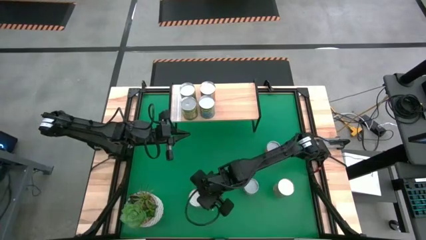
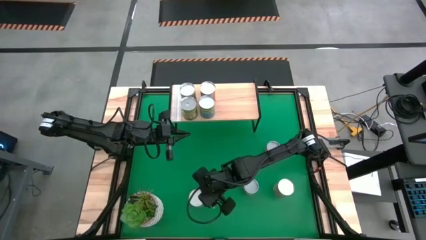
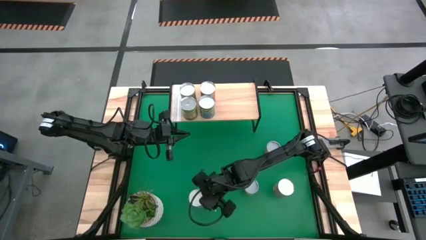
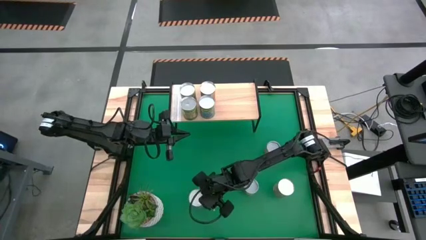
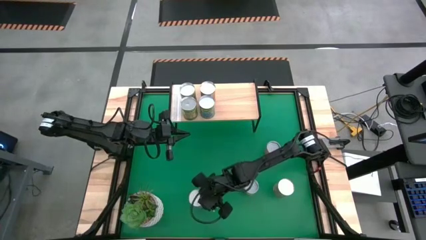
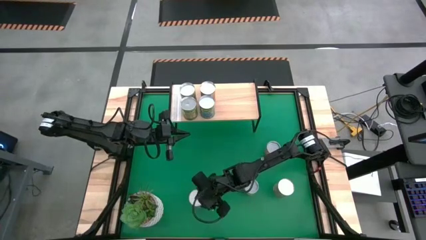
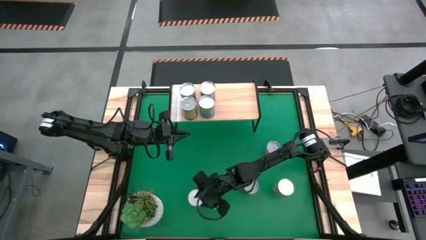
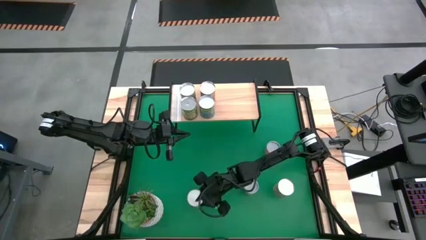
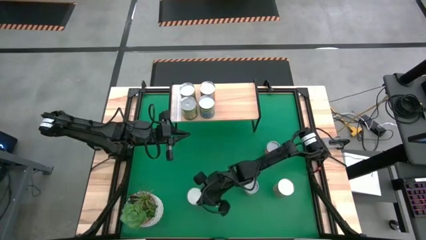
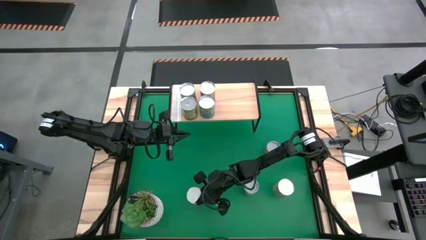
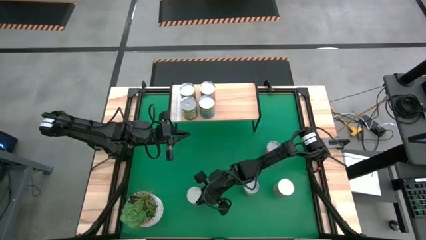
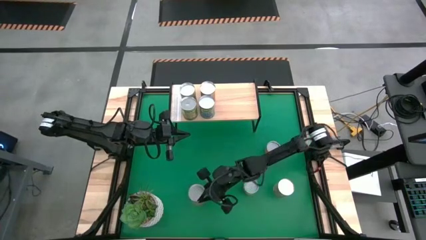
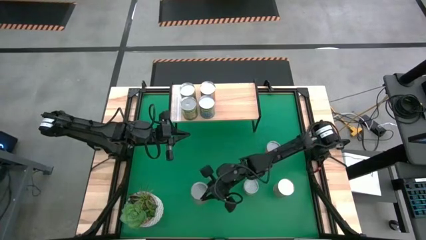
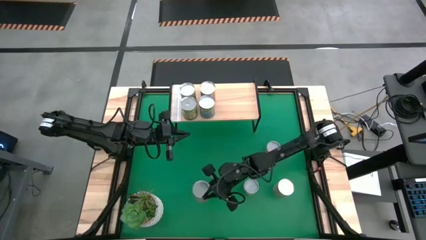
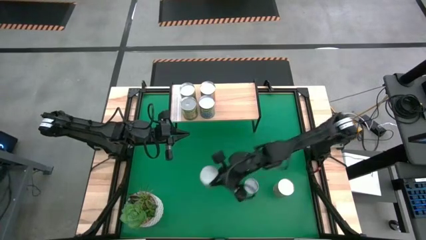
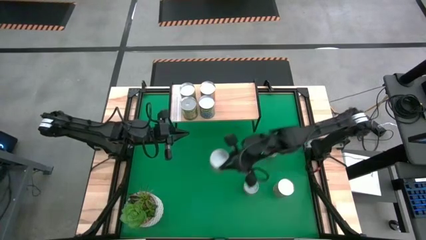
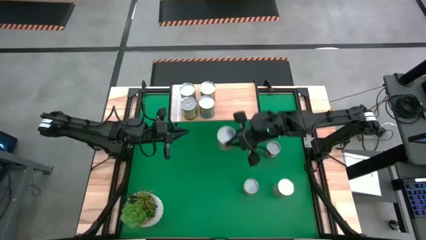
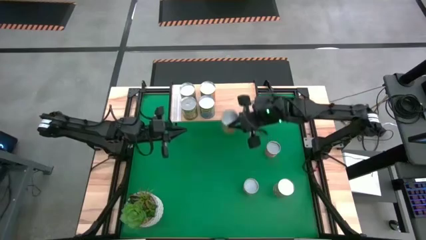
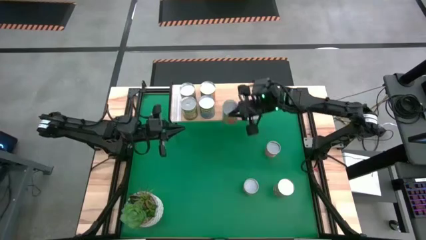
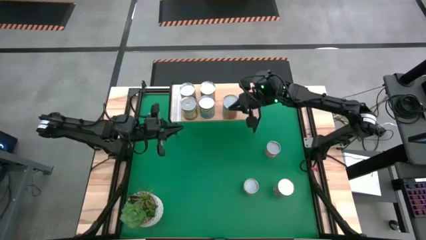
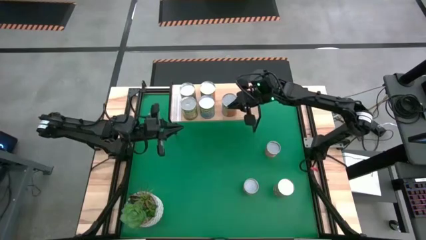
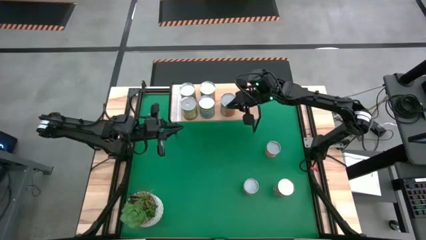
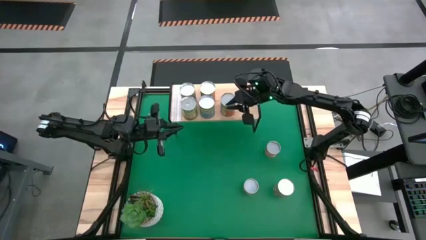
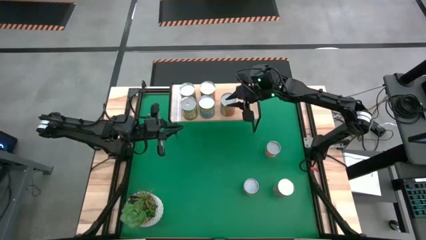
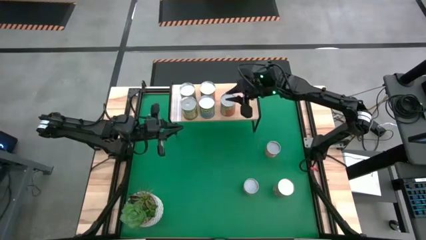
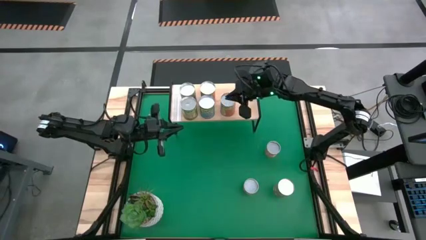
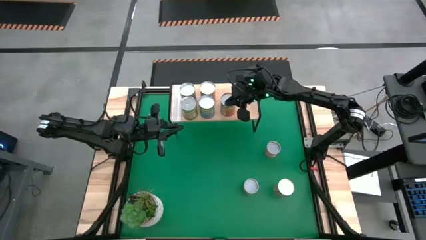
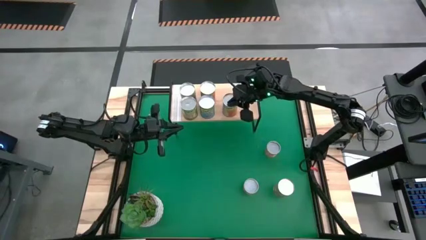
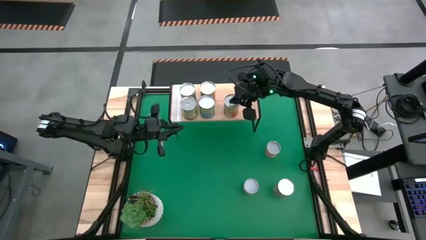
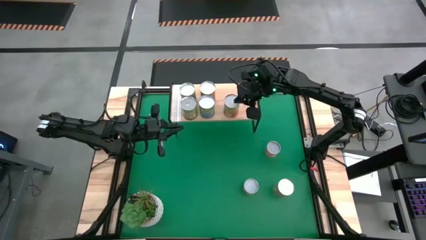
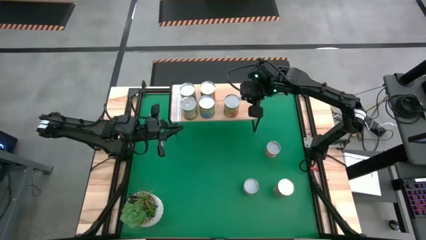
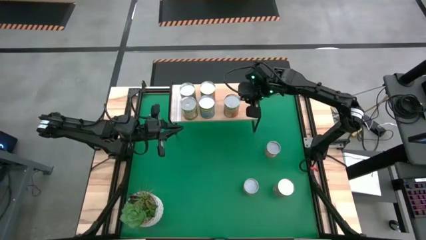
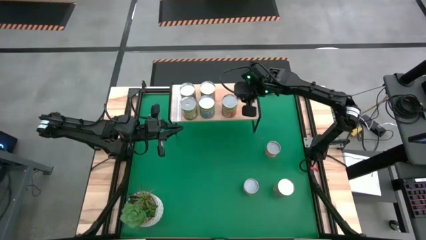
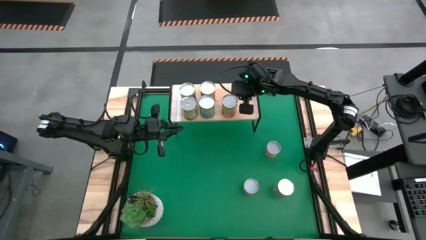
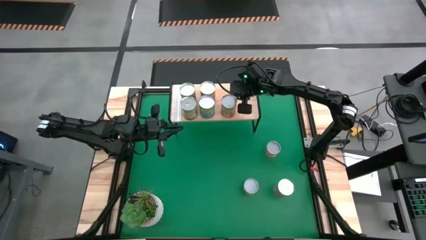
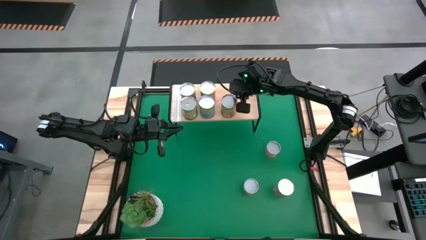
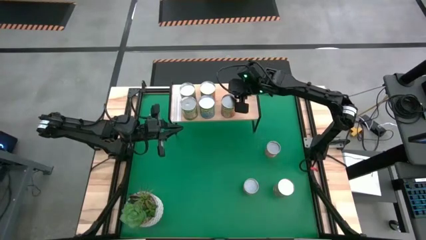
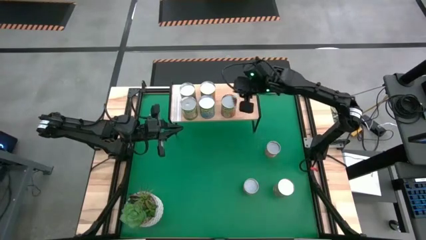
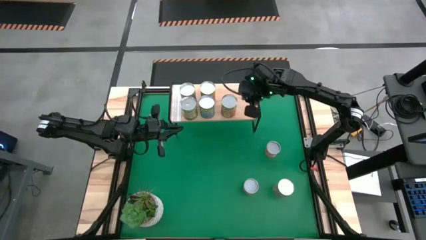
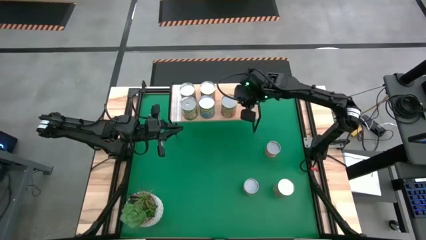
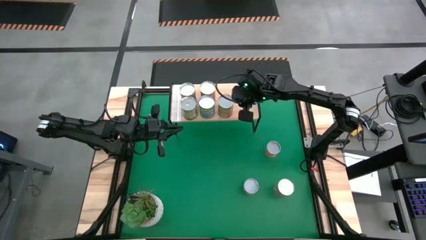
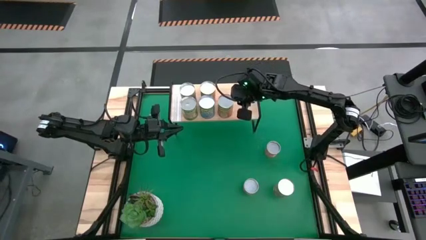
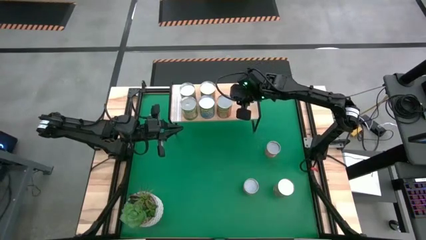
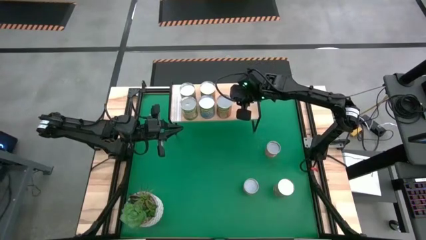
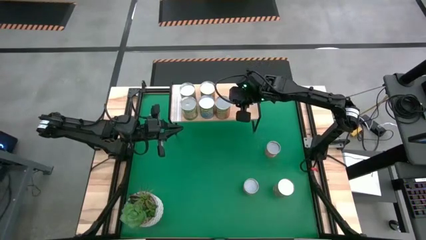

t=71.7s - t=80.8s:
Task: Pick and place cans onto a shelf
Put the canned pineapple on the shelf

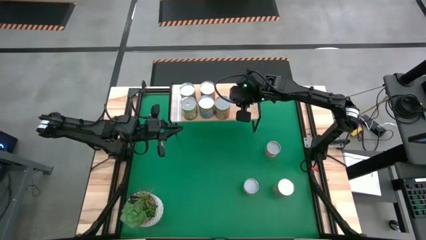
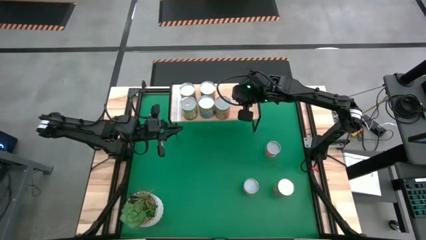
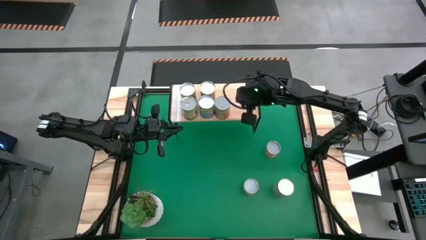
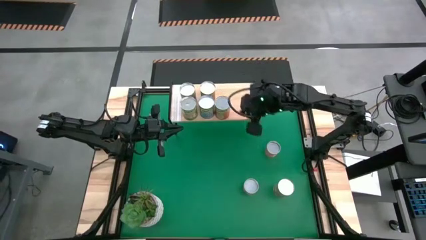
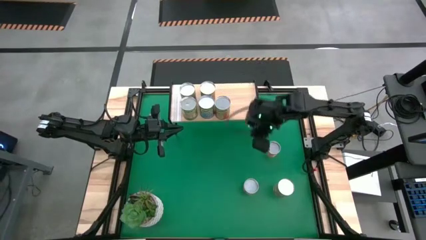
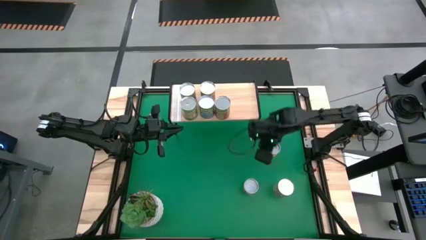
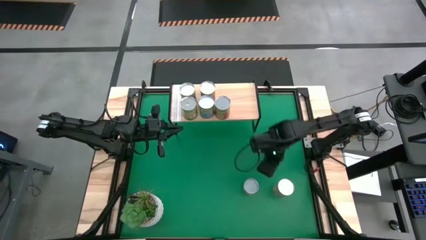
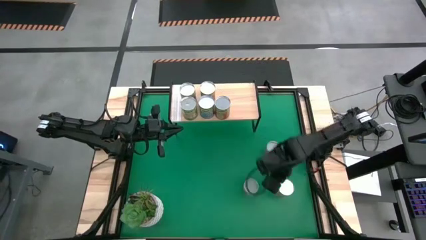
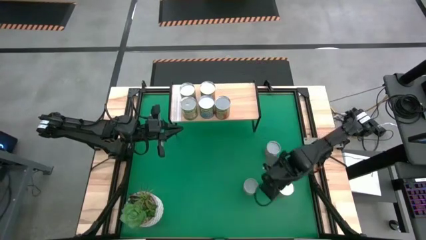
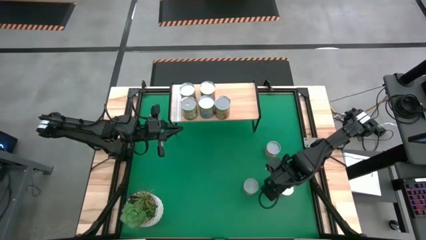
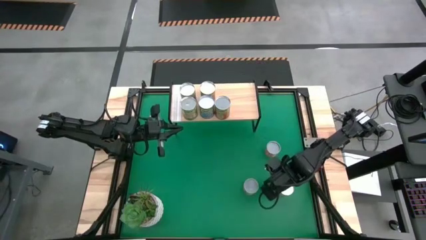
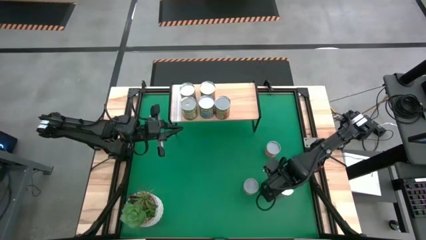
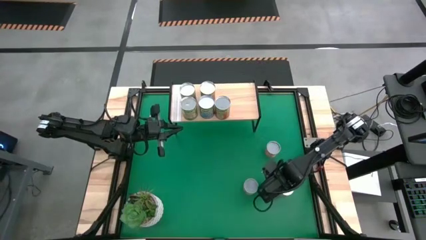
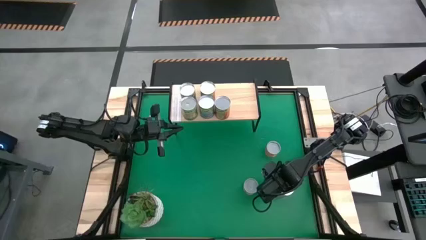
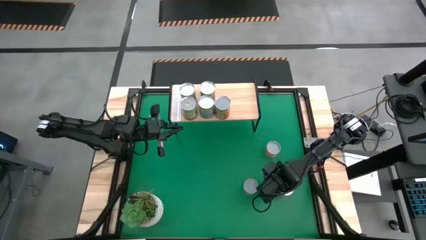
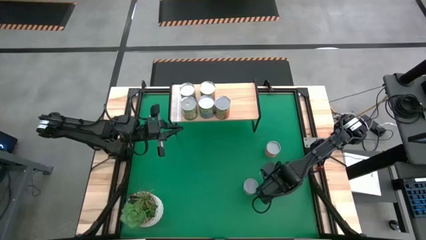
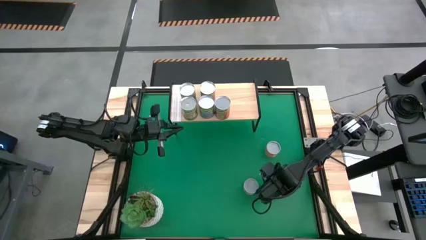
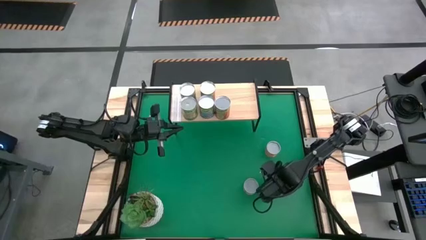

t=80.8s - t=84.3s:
Put the canned peaches on the shelf
